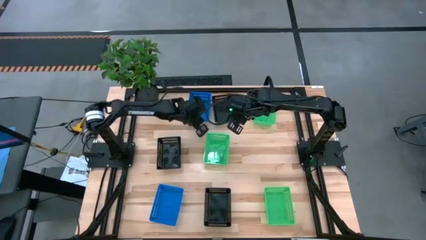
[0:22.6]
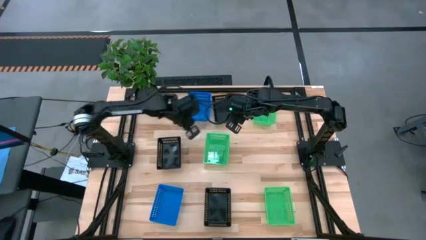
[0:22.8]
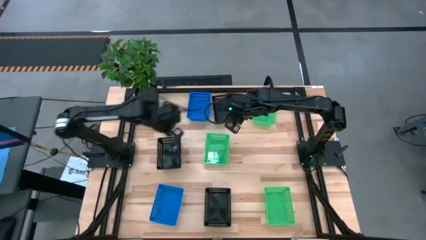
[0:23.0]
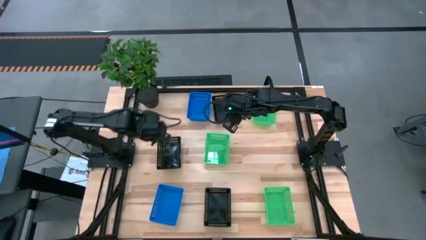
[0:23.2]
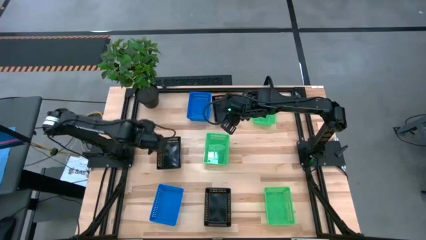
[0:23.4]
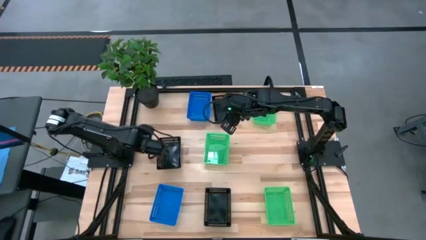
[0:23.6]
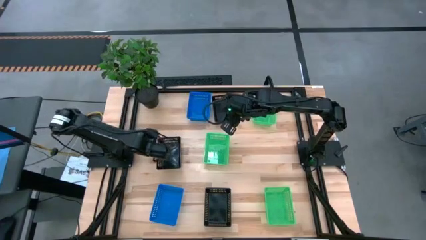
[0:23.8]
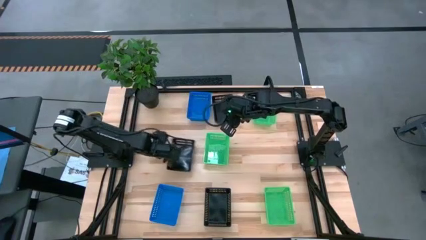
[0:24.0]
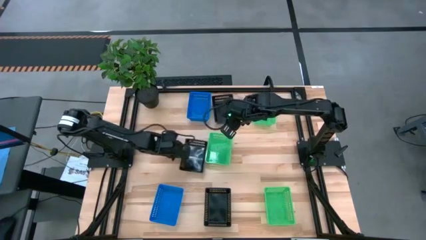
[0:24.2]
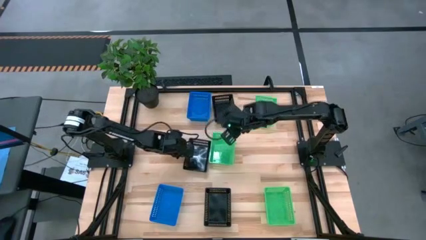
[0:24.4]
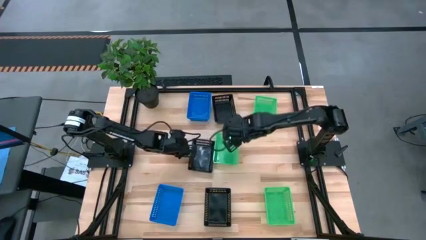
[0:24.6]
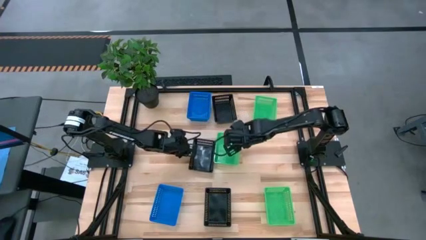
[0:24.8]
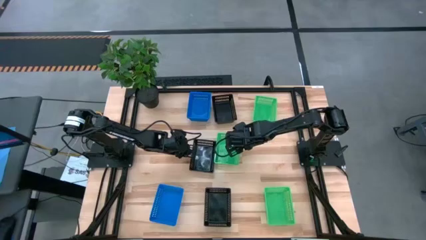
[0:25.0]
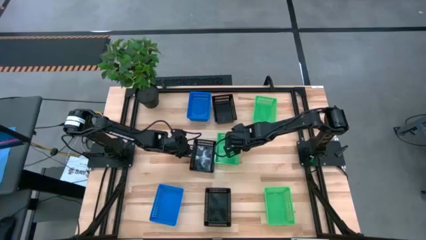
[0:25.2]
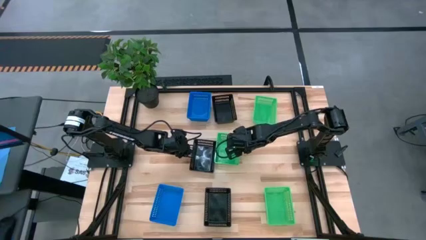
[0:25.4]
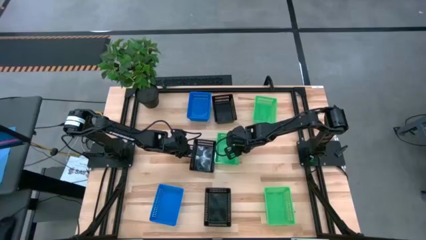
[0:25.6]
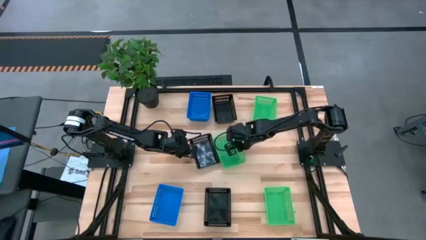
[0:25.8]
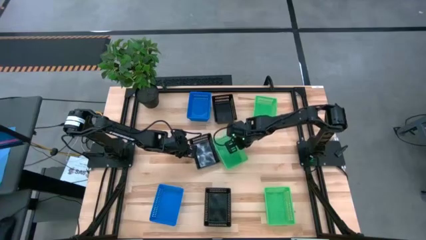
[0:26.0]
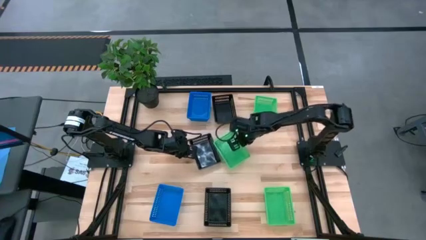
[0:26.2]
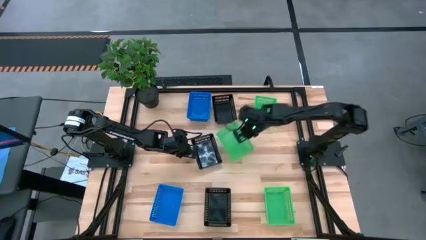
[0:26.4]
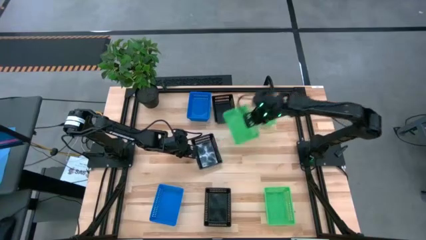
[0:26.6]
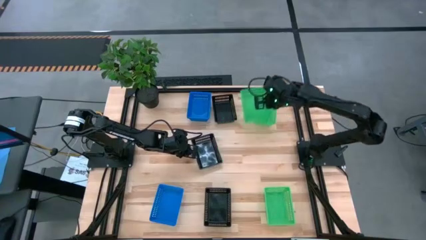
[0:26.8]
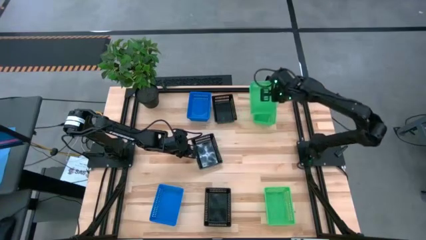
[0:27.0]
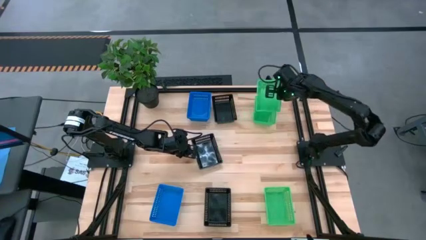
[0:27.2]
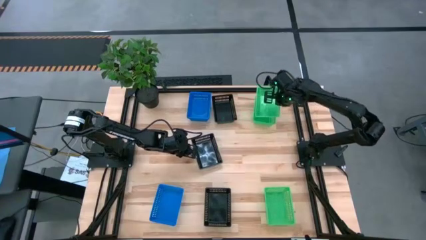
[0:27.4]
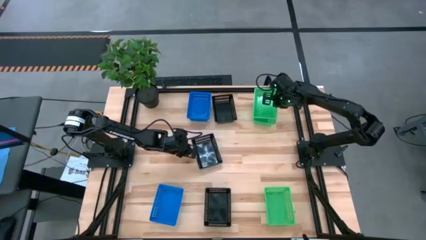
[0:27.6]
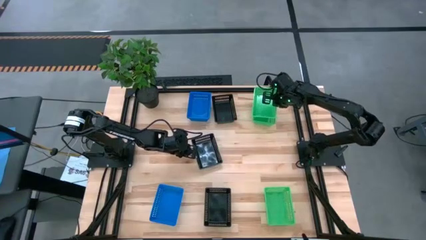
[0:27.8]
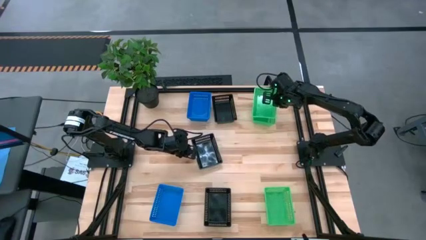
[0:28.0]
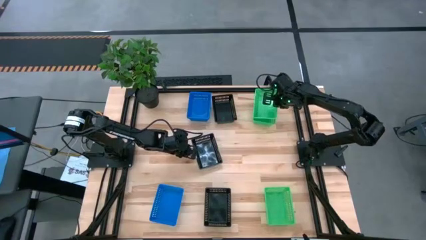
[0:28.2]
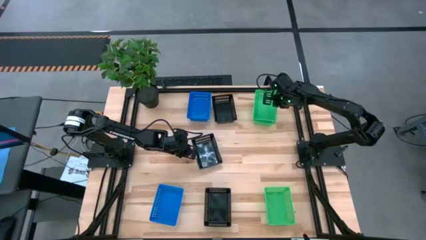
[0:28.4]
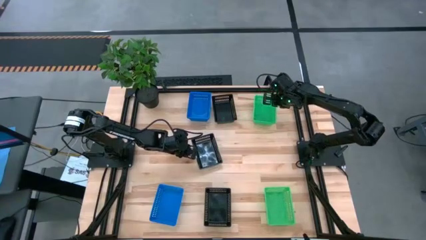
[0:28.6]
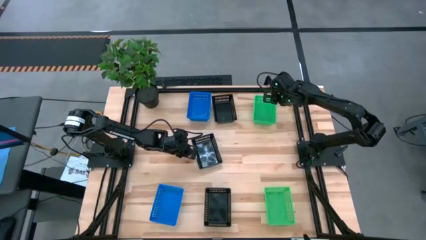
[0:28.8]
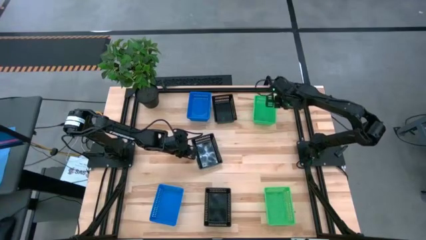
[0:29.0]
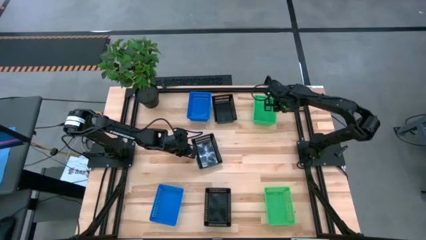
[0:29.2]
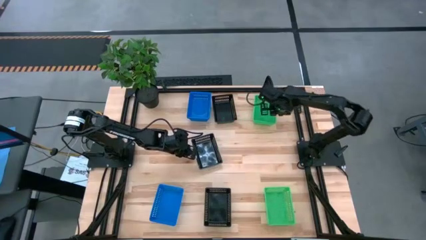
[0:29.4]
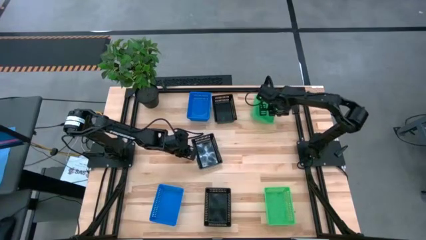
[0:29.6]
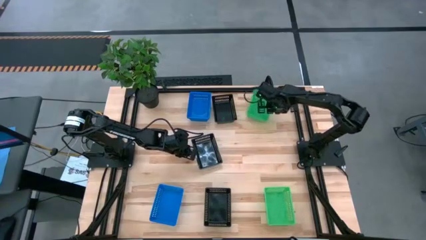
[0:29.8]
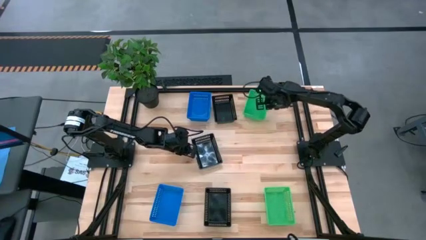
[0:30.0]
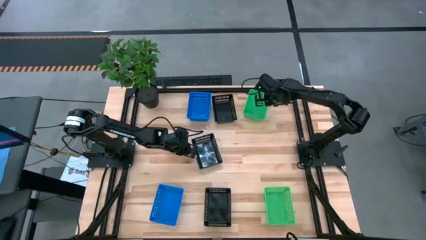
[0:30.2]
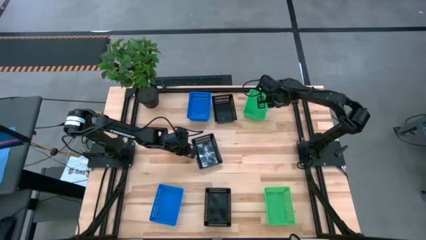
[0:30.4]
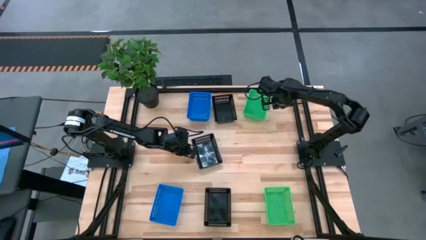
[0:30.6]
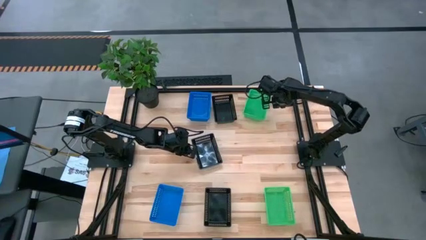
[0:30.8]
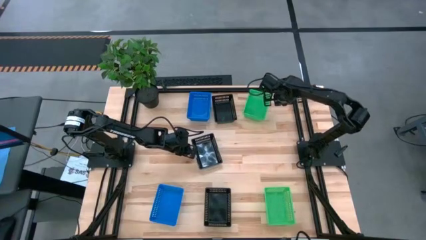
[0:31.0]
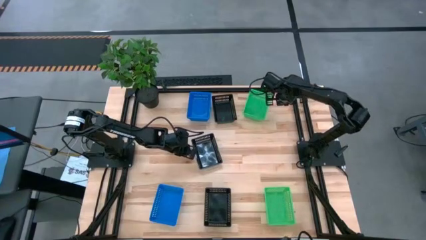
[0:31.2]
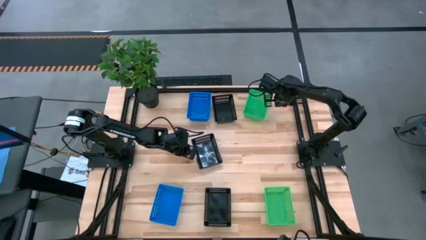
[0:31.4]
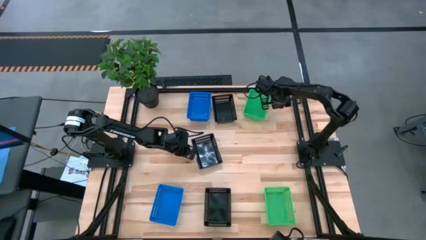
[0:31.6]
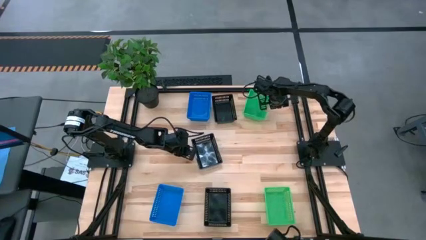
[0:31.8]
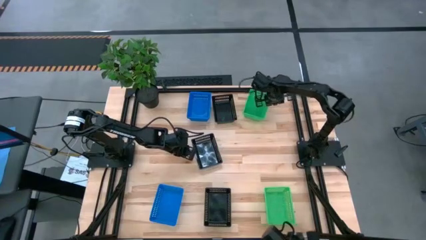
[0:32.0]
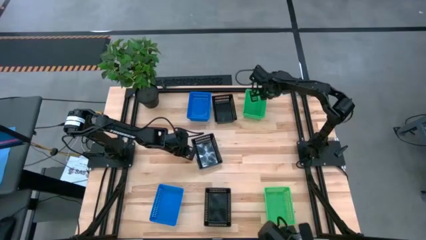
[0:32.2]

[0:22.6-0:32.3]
Stack the middle green bin on the top green bin

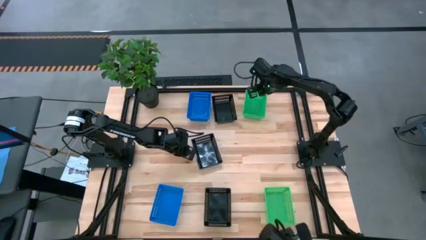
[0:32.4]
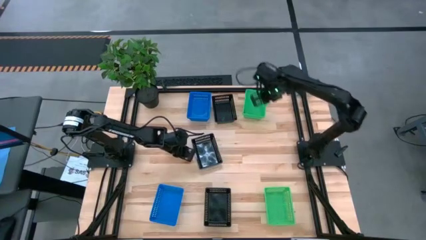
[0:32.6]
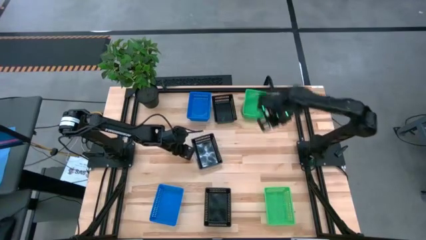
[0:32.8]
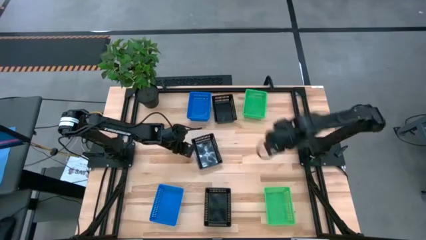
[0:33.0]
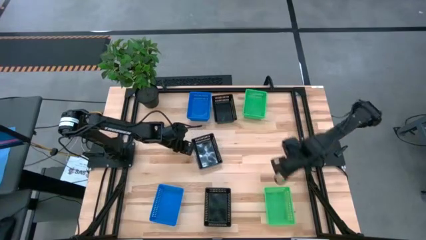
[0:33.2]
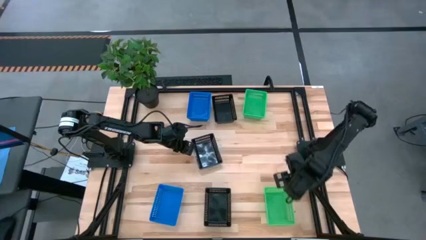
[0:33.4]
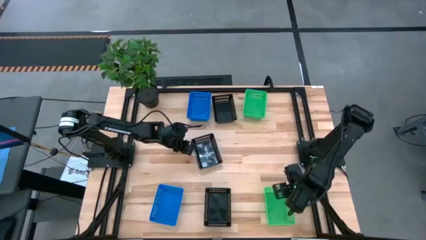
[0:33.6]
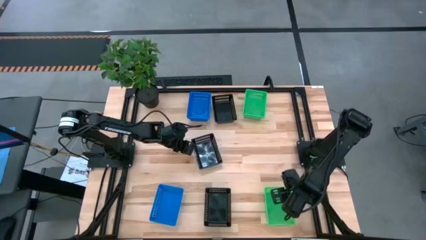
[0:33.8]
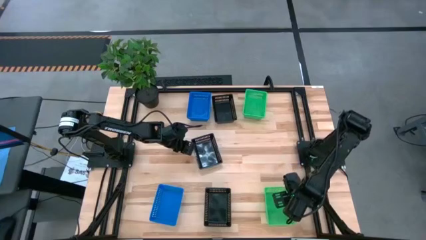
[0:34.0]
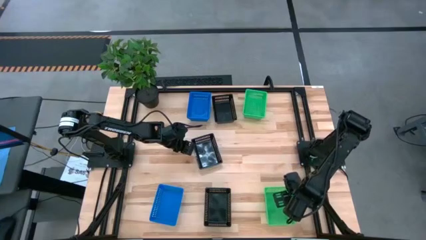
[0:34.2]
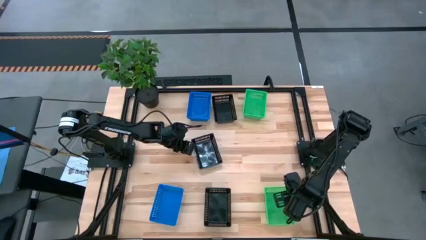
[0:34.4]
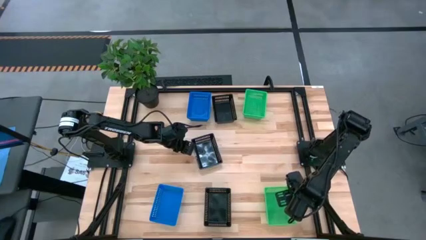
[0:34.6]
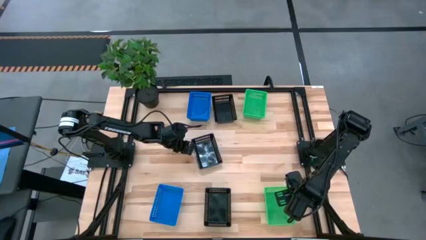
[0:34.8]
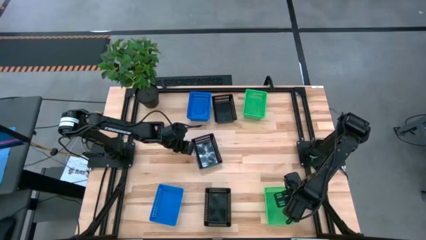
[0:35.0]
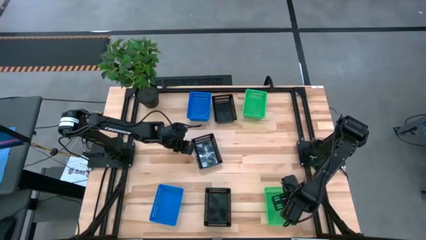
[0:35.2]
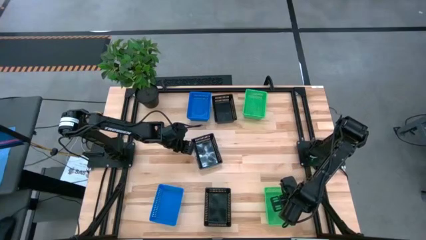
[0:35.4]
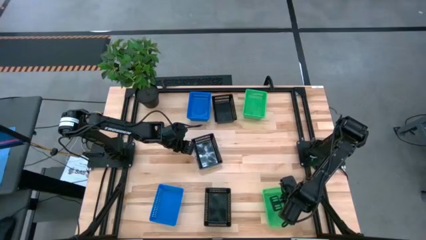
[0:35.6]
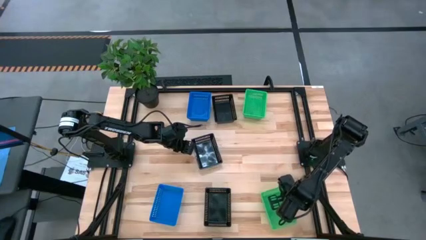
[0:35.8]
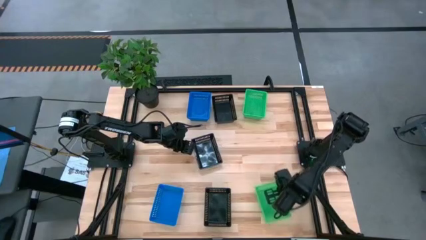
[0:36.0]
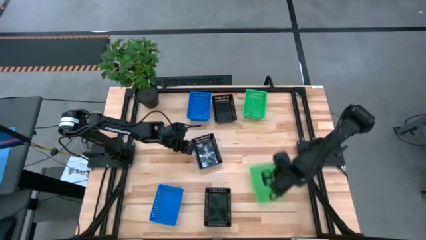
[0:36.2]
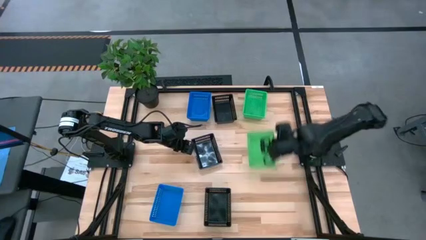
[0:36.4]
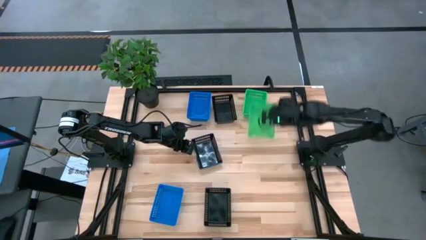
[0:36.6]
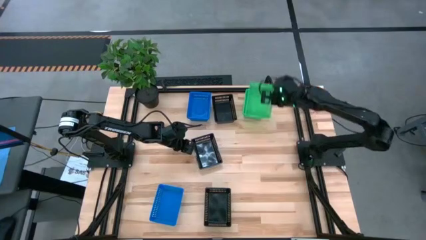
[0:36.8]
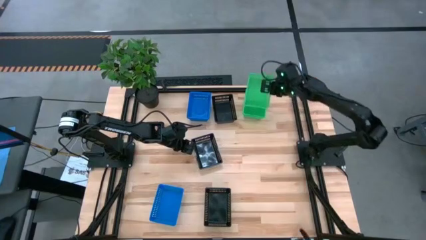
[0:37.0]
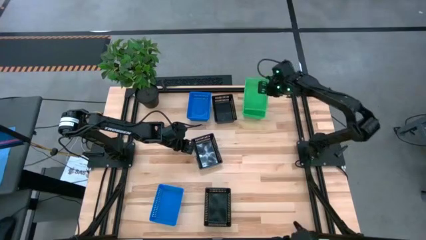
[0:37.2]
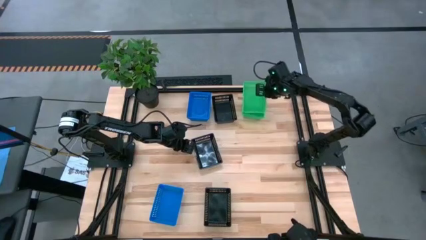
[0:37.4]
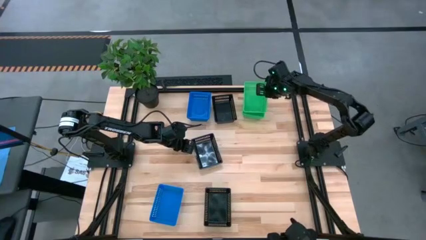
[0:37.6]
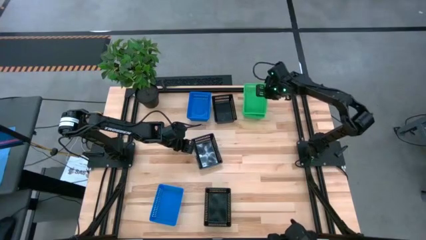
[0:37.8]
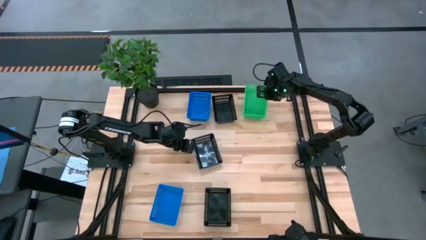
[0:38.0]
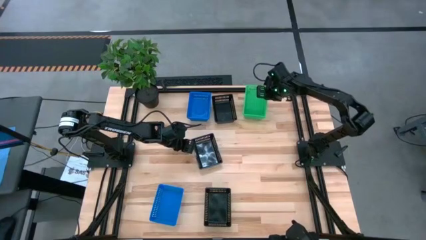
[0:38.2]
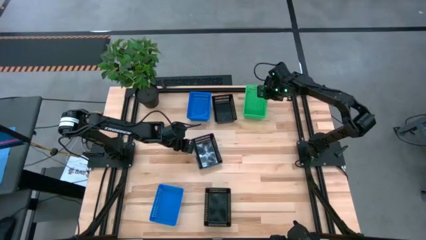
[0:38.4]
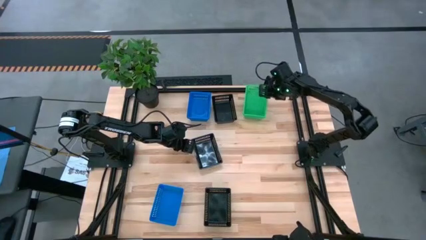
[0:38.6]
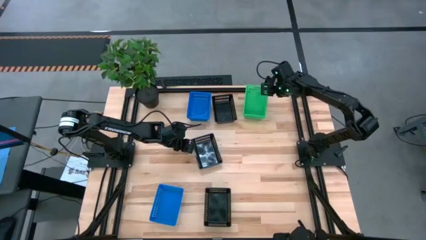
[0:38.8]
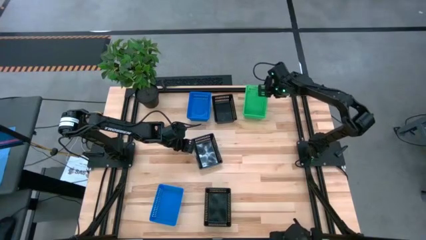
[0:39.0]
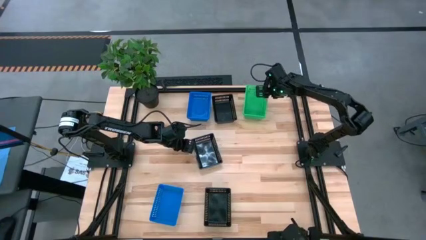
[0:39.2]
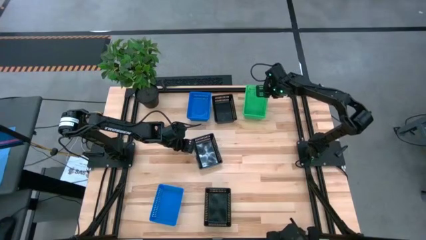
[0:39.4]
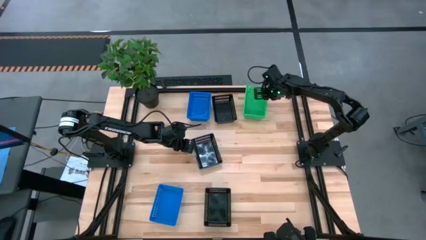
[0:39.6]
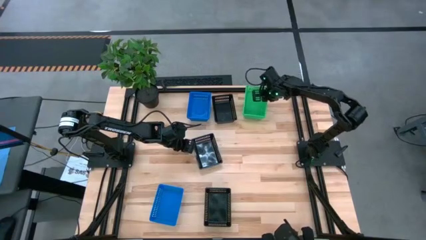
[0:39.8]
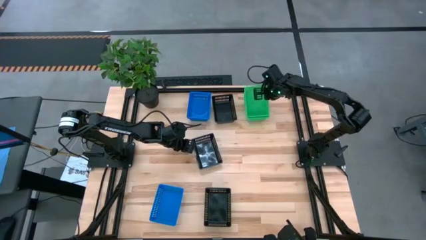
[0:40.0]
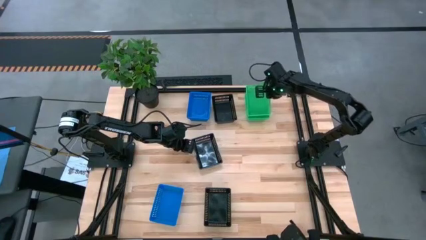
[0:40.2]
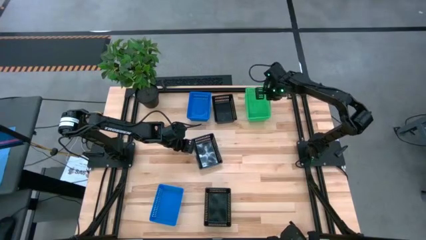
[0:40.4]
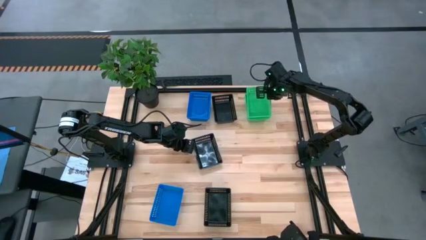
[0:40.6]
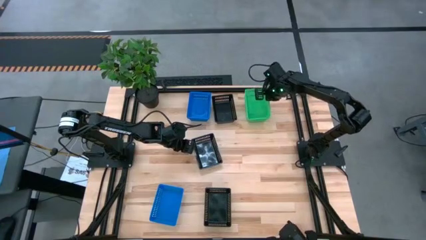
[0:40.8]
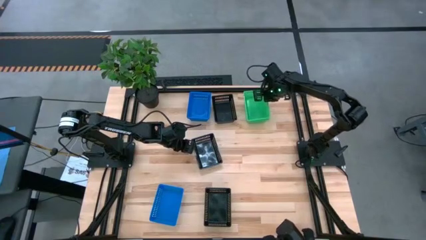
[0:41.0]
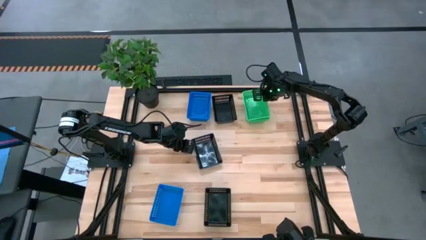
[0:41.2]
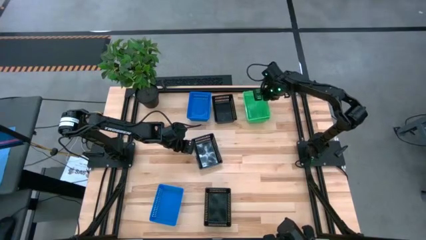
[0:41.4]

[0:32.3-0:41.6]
Stack the bottom green bin on the stacked green bins
